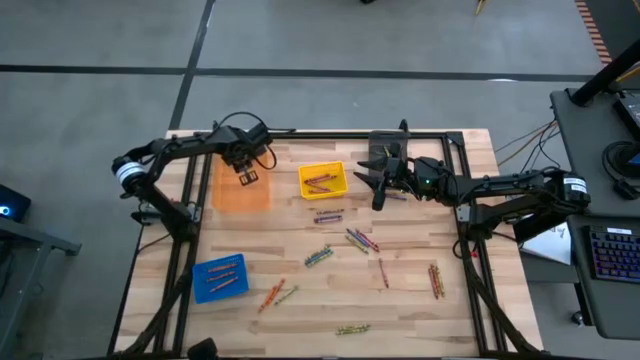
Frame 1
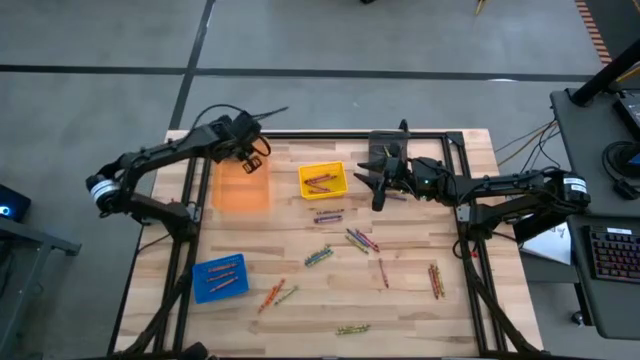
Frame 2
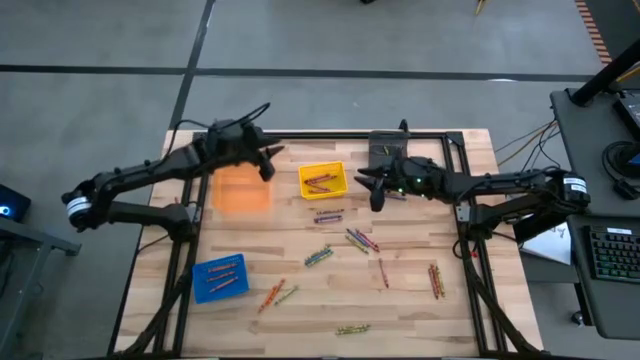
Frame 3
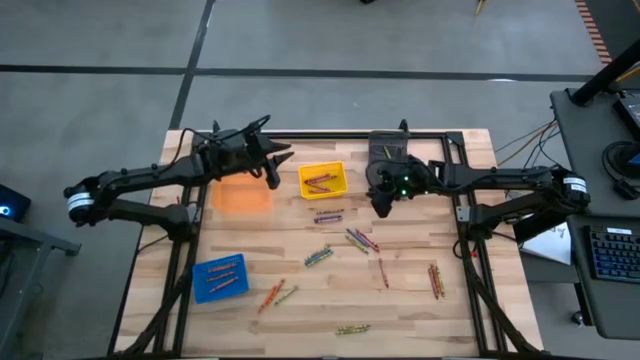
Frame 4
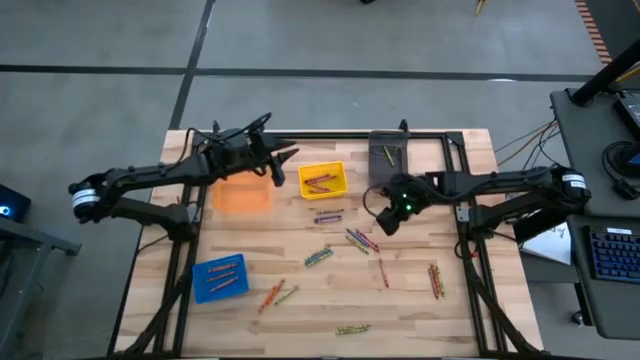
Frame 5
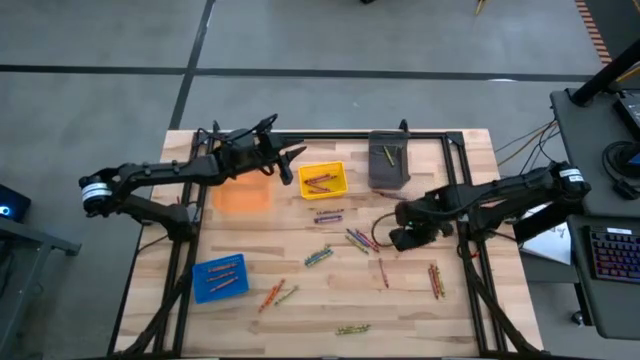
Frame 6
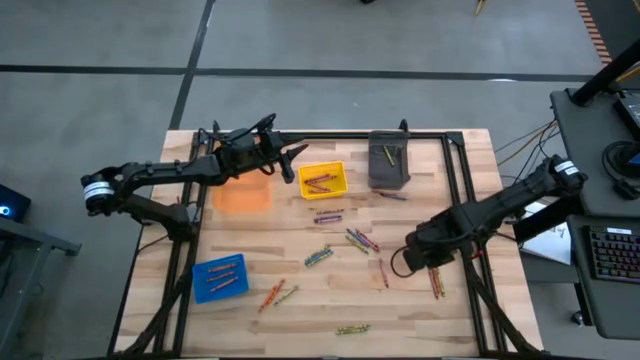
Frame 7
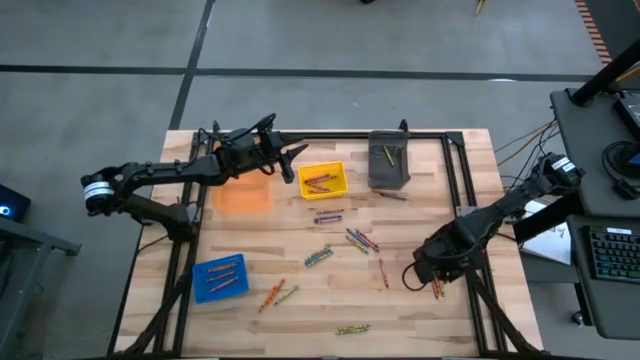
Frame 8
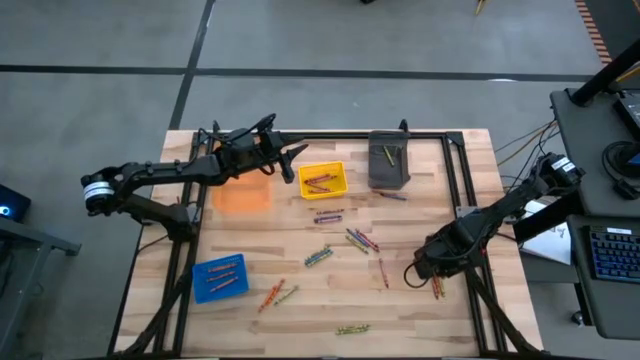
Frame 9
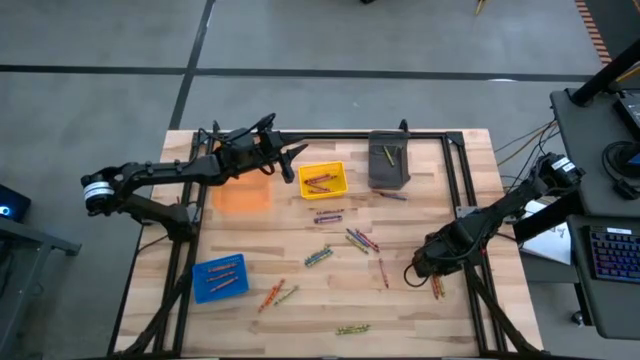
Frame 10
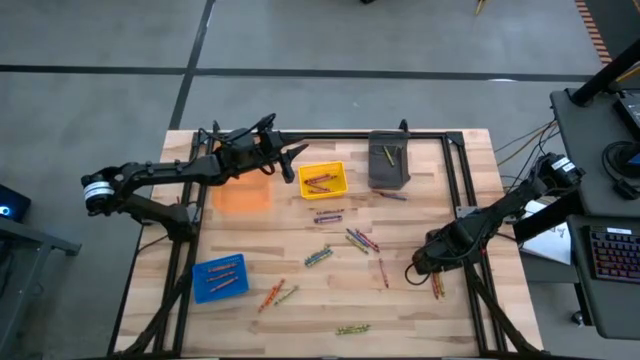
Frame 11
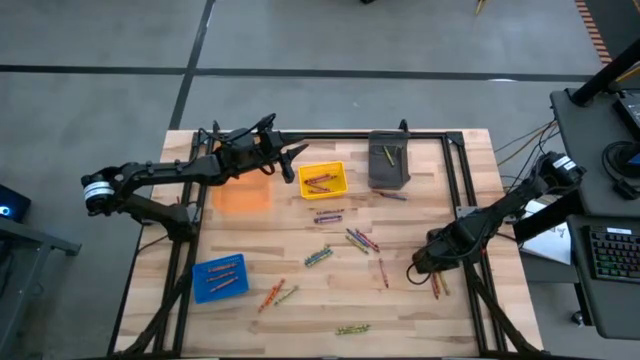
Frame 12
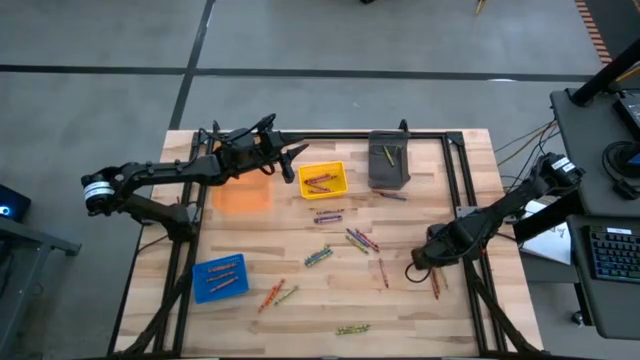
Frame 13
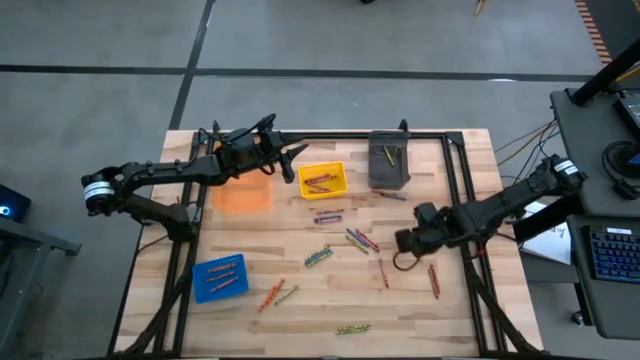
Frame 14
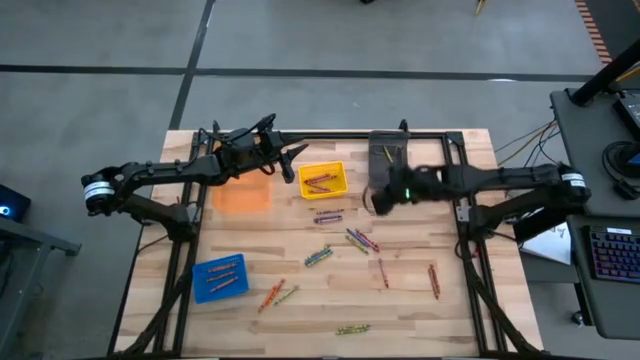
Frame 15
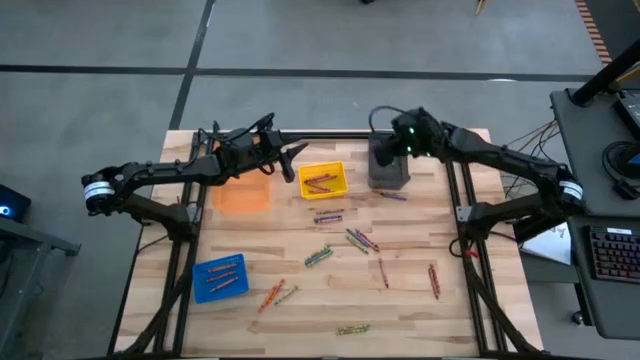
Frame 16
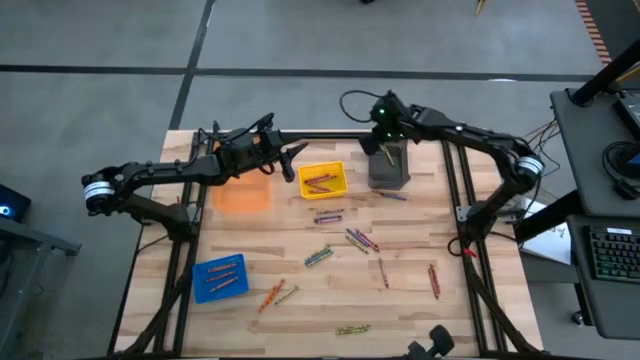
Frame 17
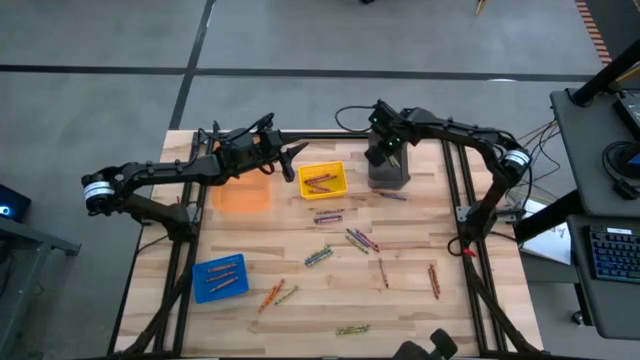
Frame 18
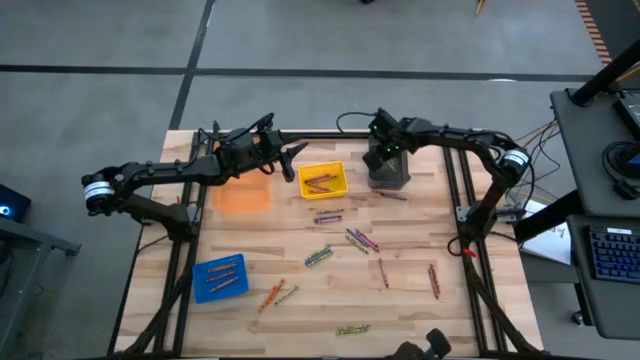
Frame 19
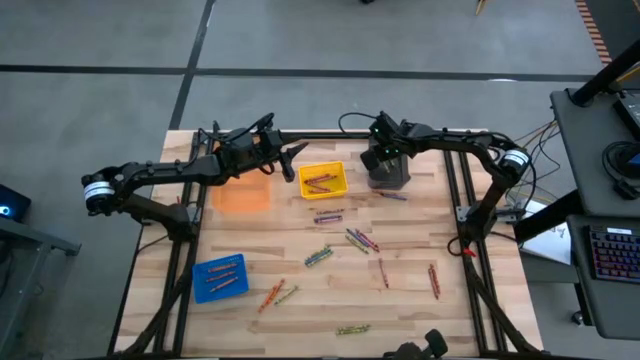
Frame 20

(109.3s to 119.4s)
Task: Sort crayons
Put the green crayon into the black bin

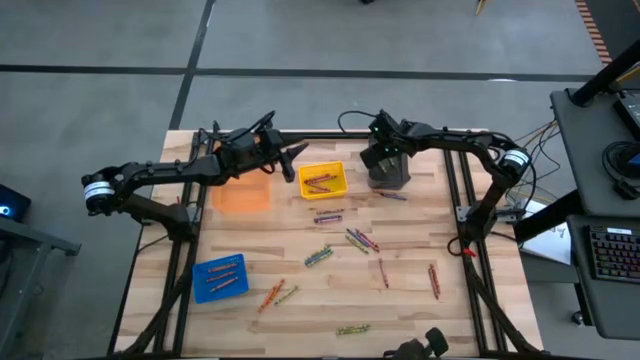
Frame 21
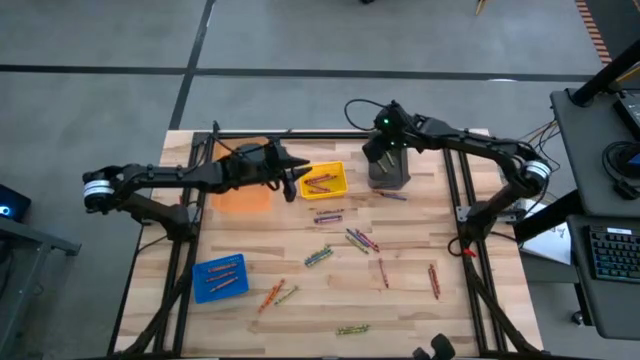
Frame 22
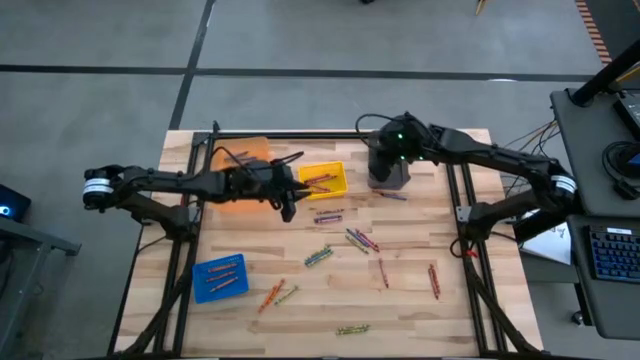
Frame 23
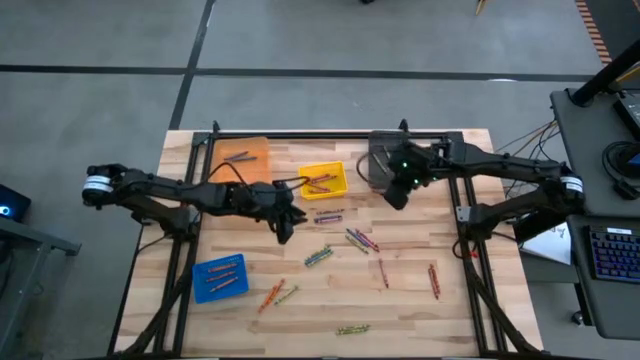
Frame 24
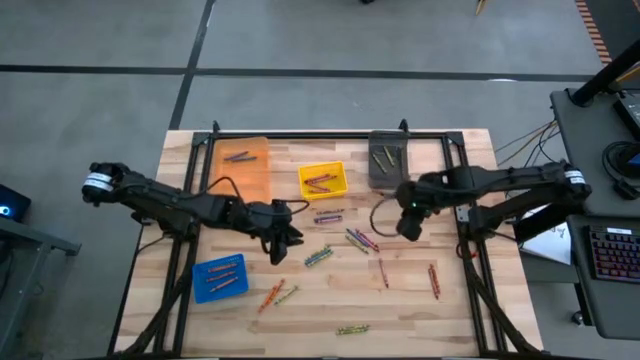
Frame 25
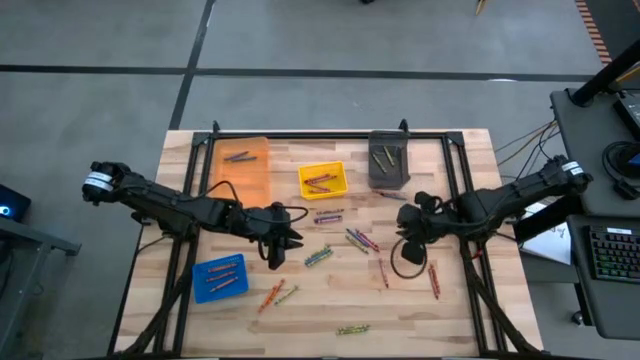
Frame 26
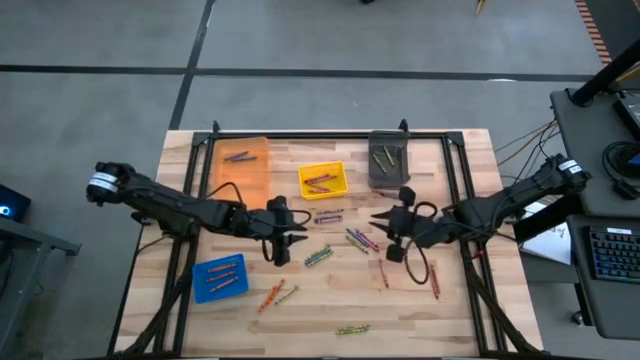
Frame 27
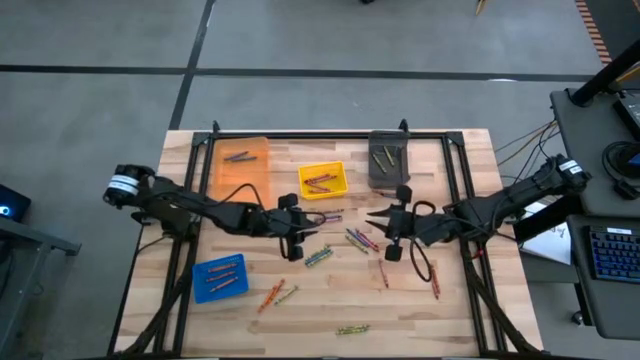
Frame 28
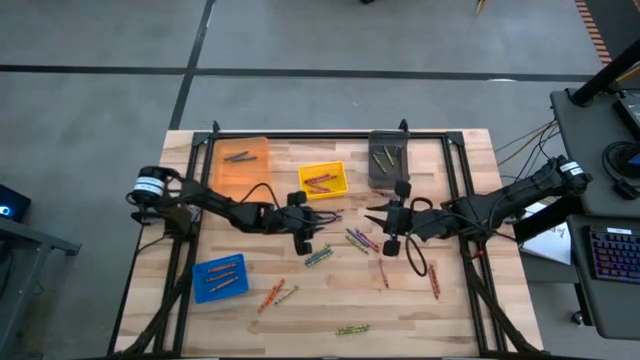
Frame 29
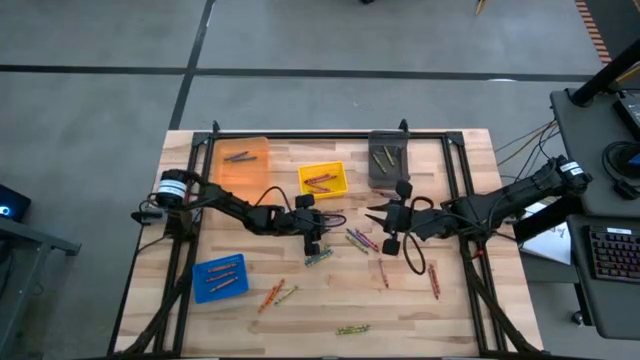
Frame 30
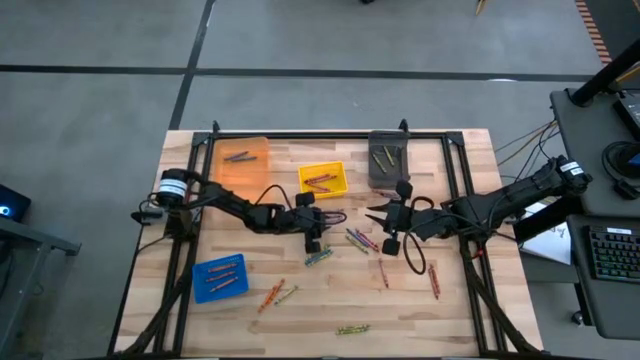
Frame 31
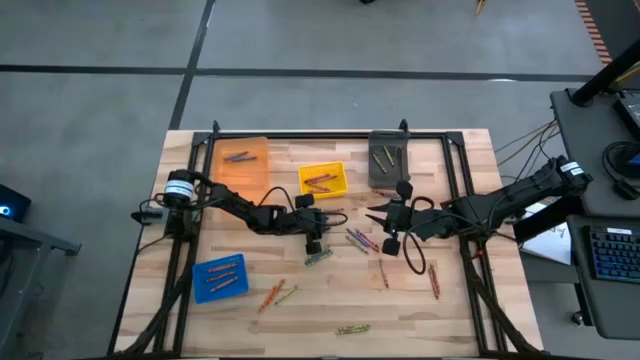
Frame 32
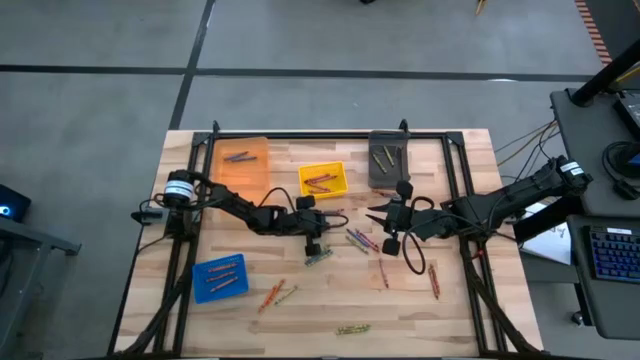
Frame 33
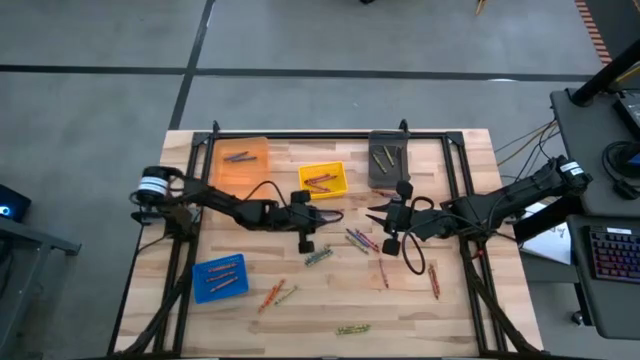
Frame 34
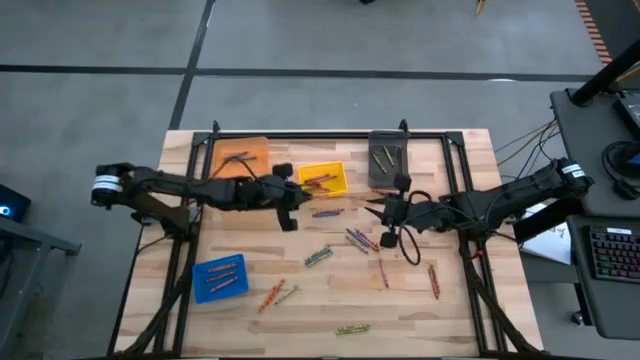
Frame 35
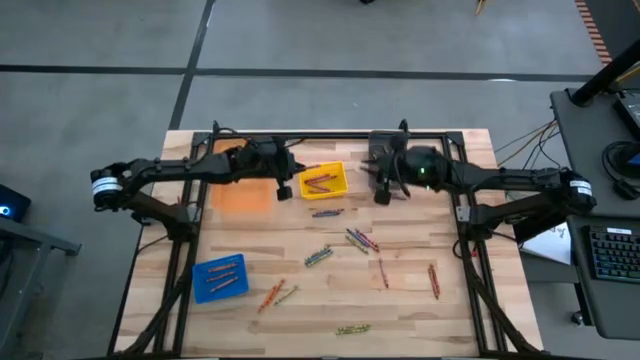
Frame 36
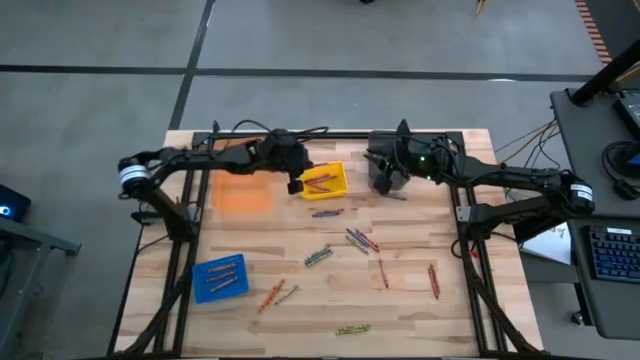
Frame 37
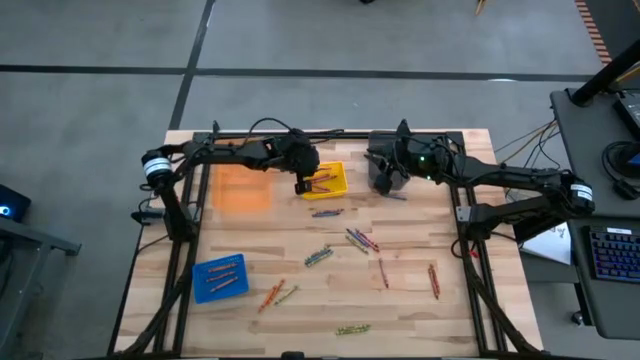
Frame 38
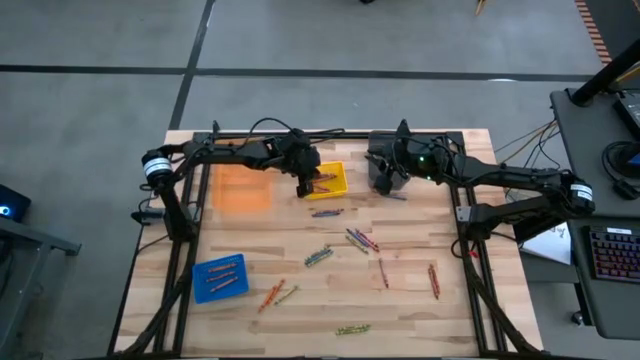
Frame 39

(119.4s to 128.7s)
Put the red crayon into the yellow bin
